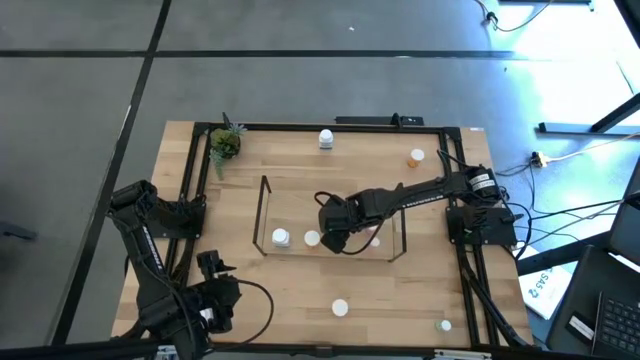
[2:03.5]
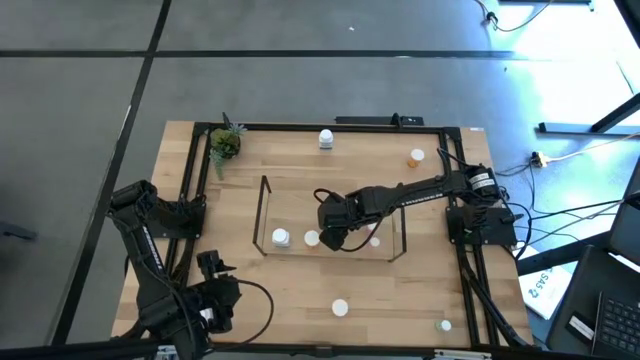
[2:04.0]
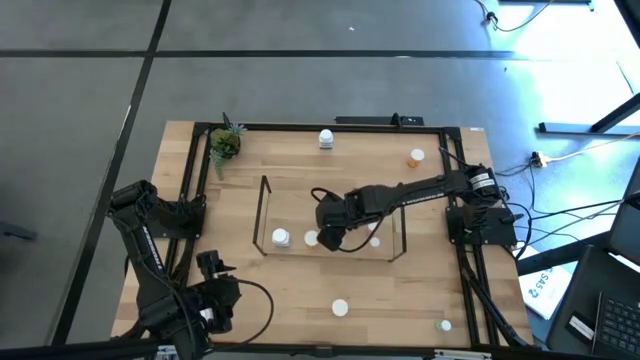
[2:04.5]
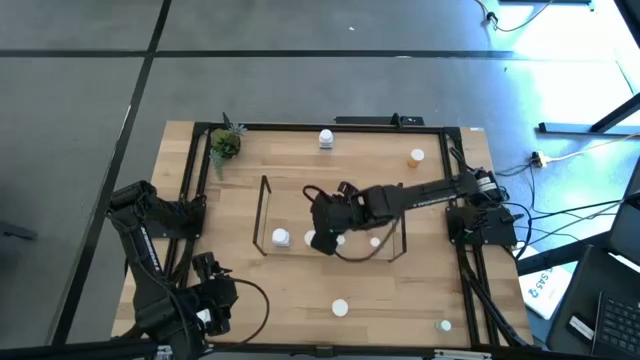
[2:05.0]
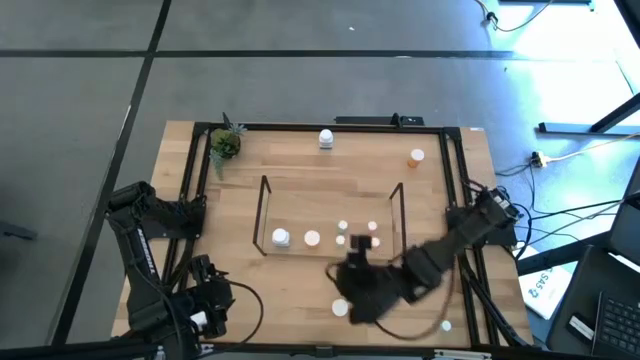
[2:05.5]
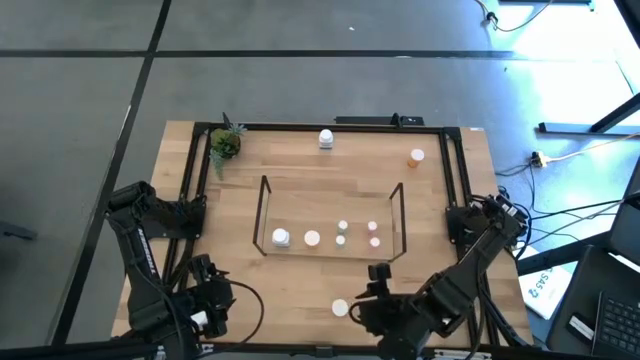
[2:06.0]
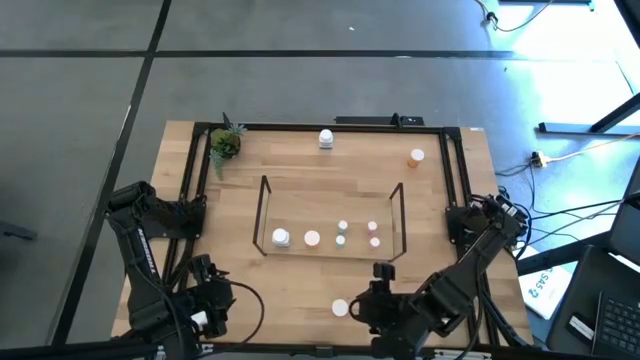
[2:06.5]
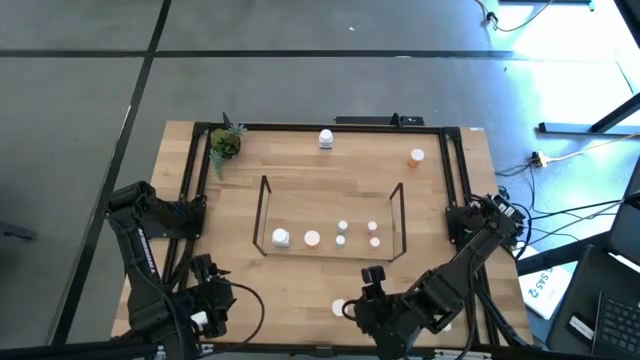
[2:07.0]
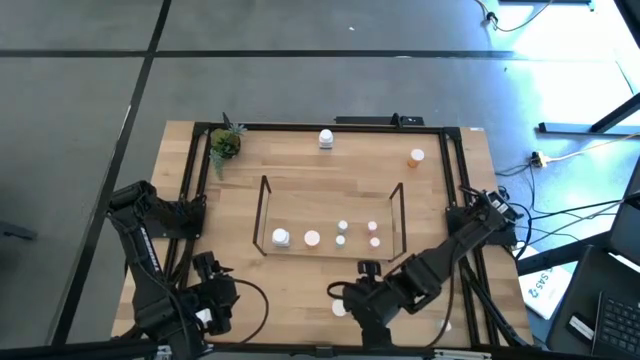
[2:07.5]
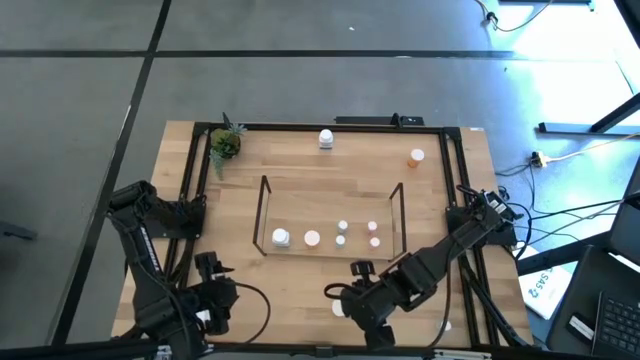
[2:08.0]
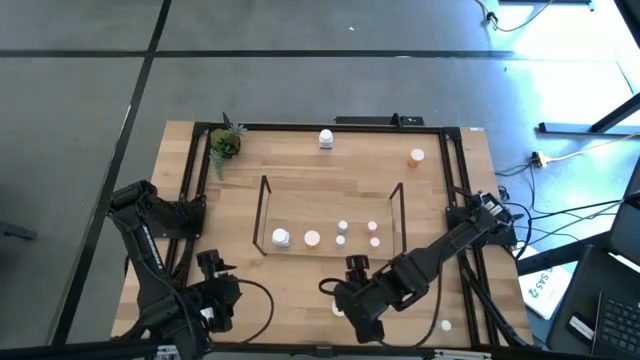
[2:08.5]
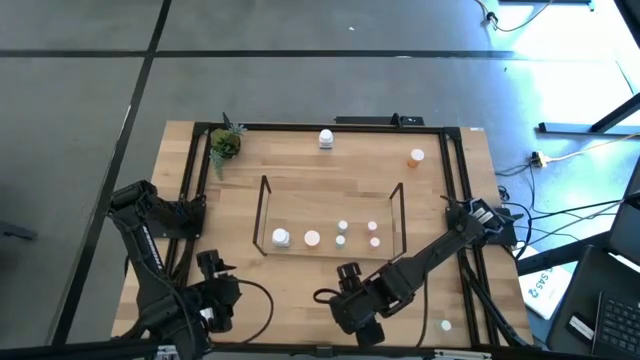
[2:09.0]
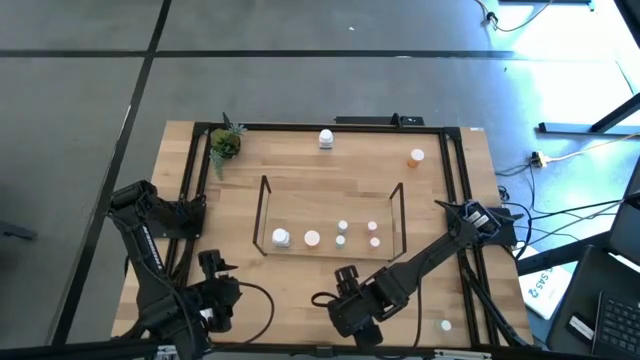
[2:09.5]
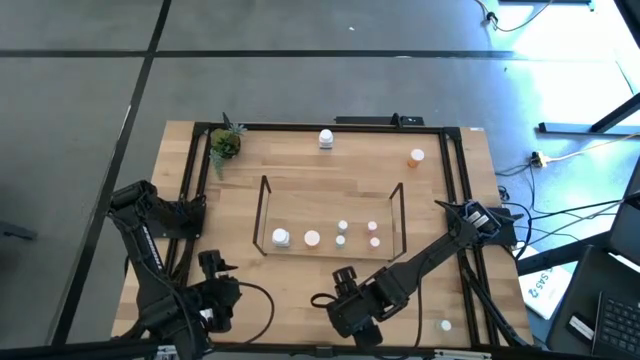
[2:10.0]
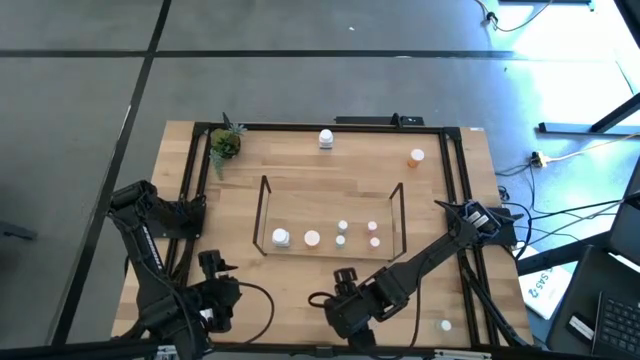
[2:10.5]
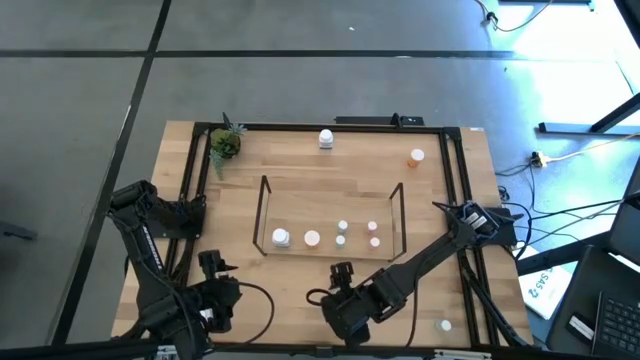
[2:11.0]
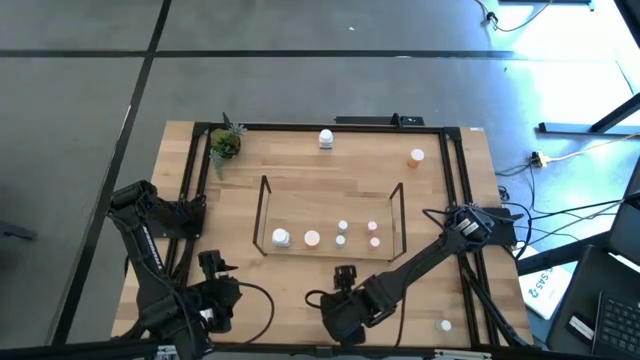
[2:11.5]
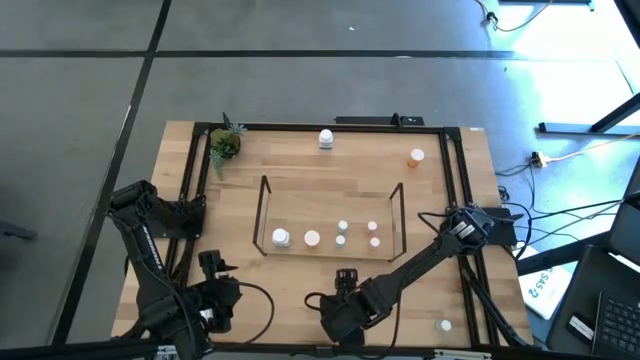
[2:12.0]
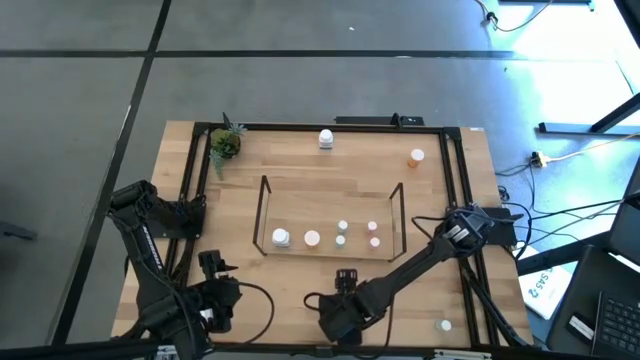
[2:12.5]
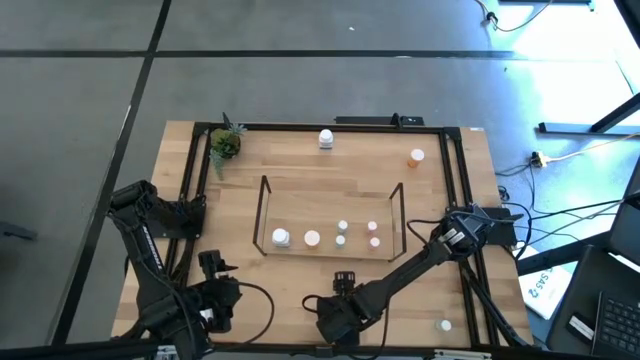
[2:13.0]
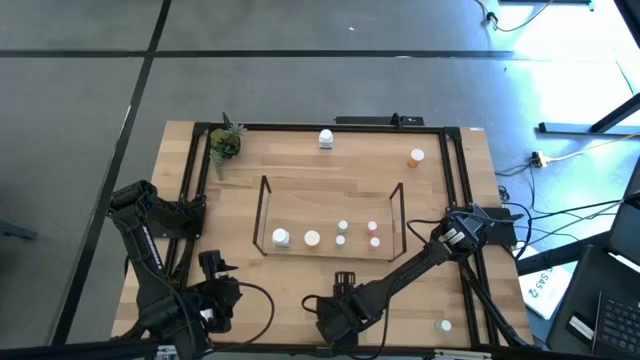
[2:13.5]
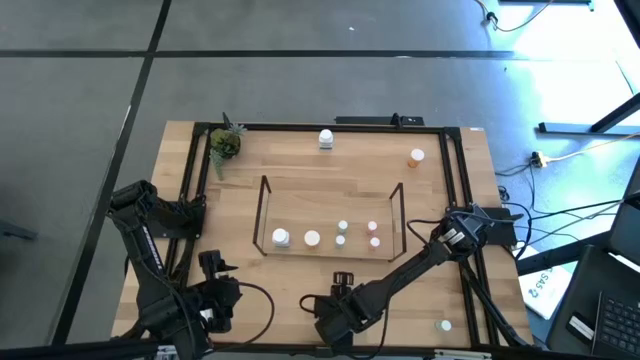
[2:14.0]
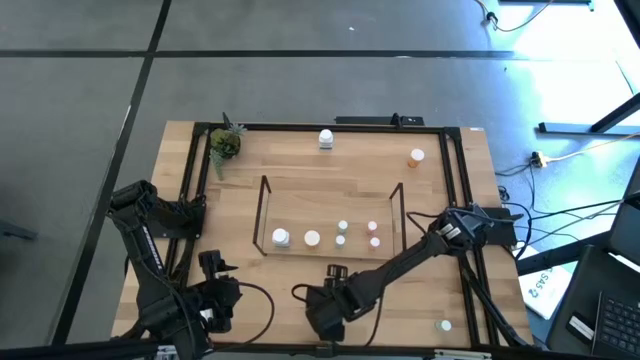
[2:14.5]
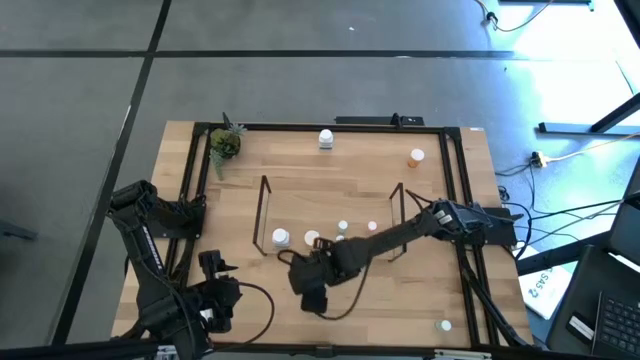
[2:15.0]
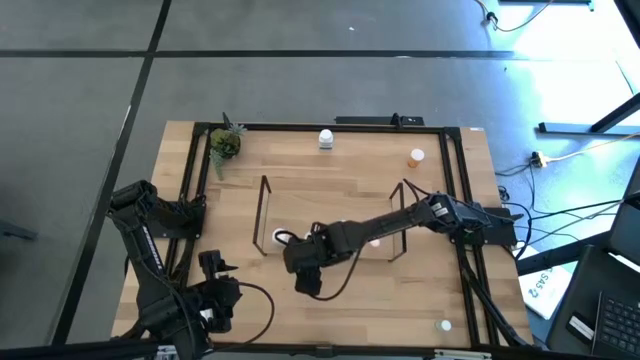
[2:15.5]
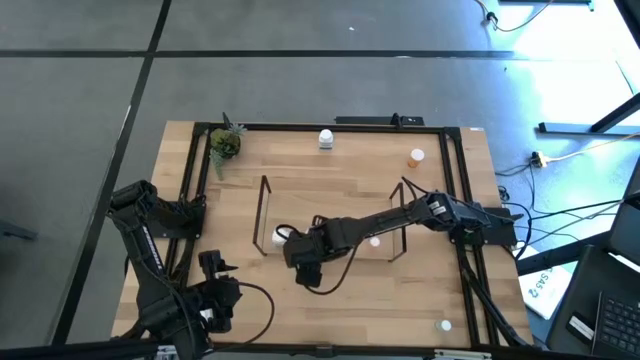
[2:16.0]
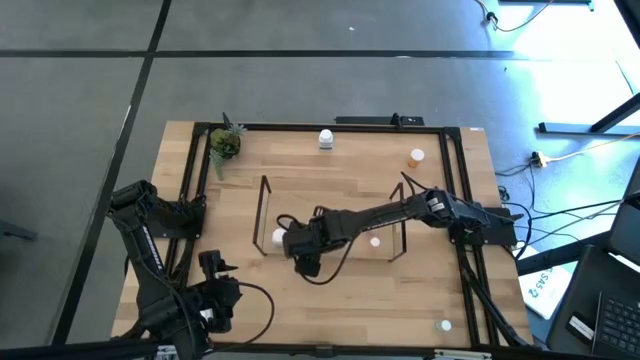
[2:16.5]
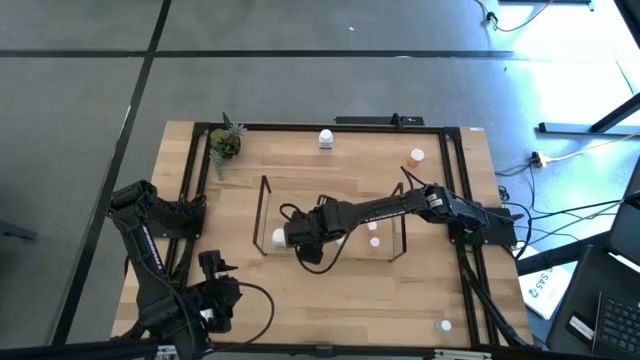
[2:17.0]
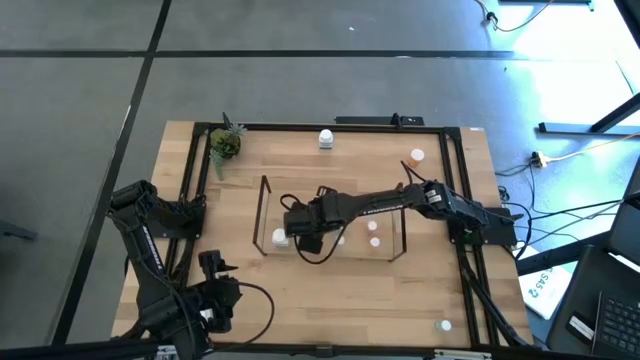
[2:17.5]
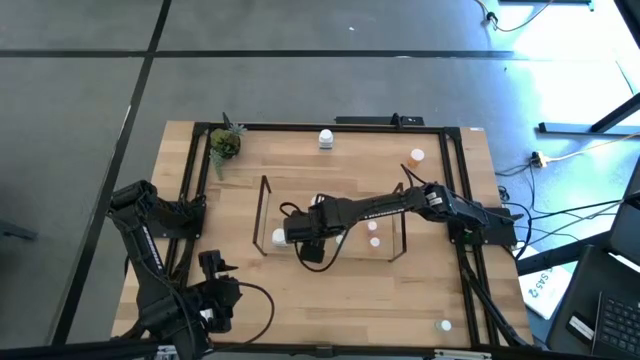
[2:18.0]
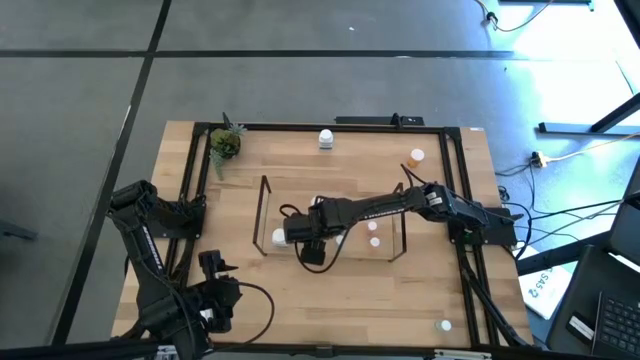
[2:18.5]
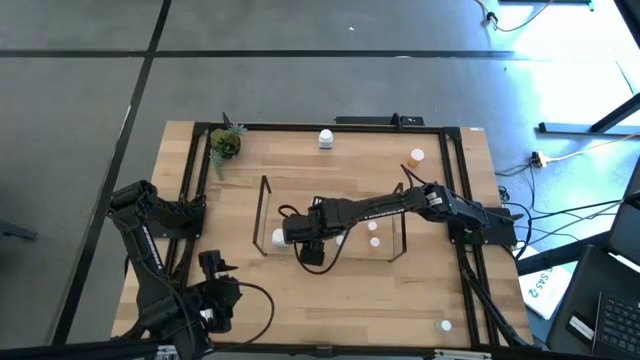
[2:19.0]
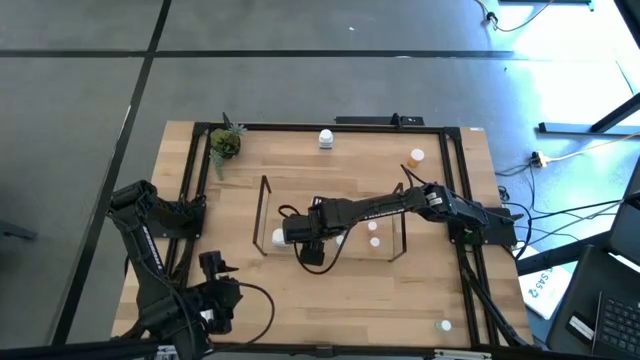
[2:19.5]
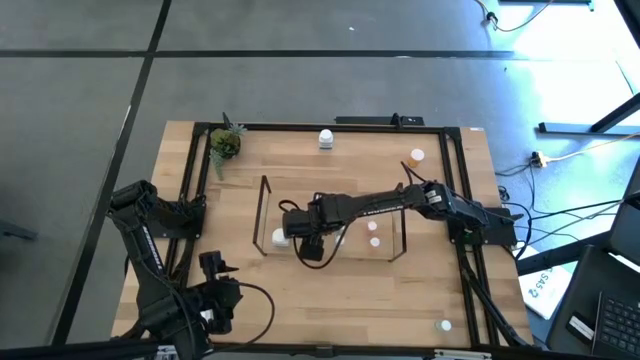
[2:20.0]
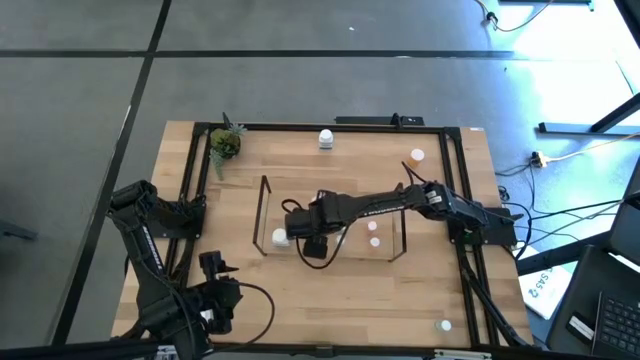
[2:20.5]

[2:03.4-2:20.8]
Task: Pick and place medicine bottles onto shelf by color
Put the bottom orange pill bottle on the shelf aligned with the other orange pill bottle

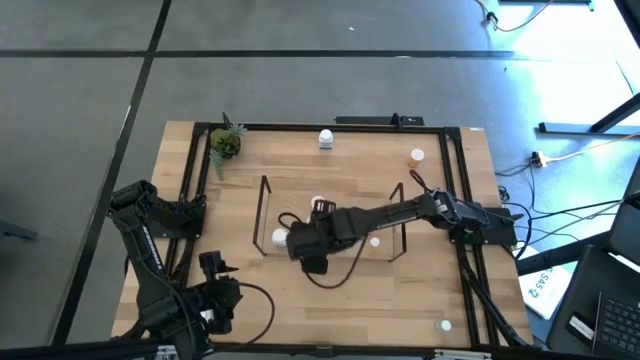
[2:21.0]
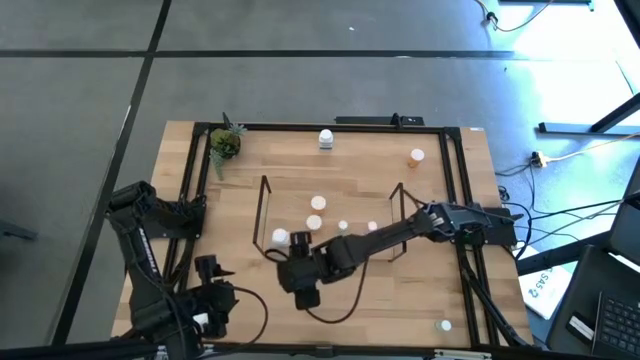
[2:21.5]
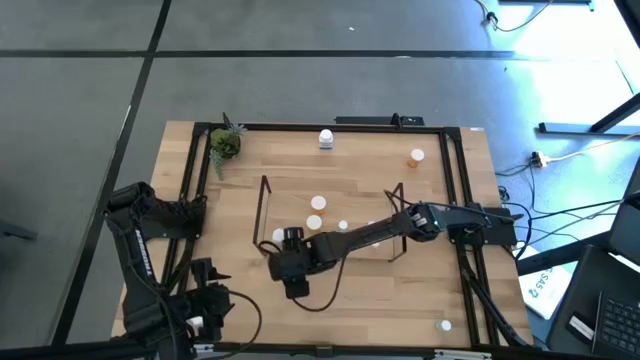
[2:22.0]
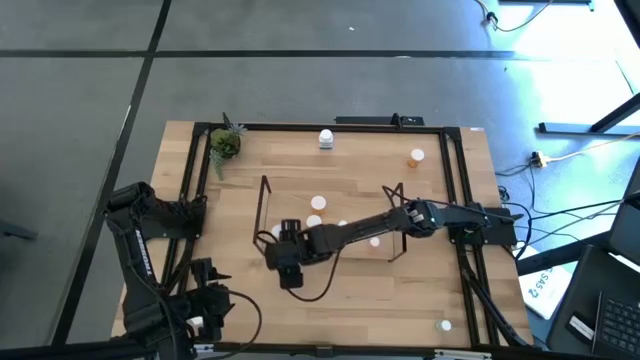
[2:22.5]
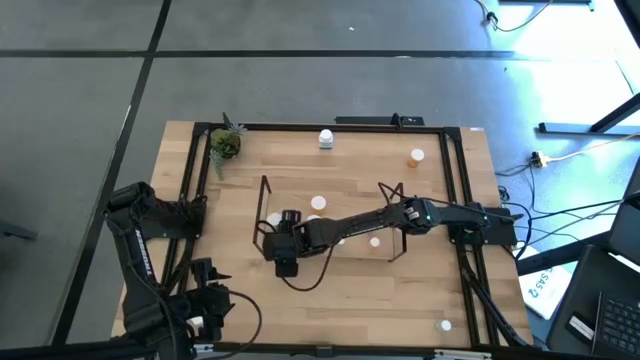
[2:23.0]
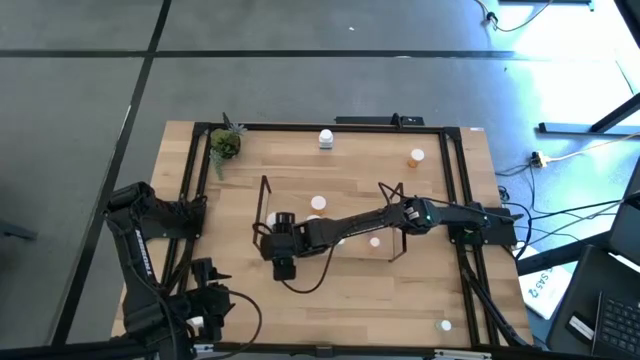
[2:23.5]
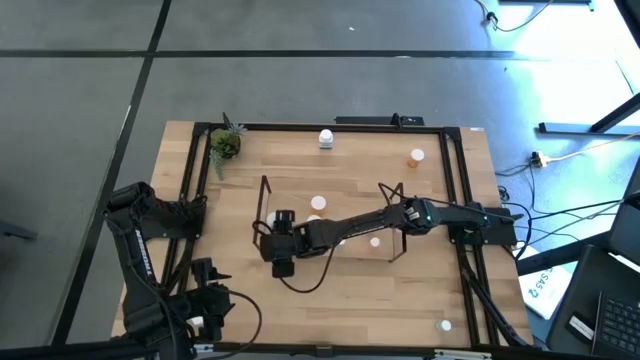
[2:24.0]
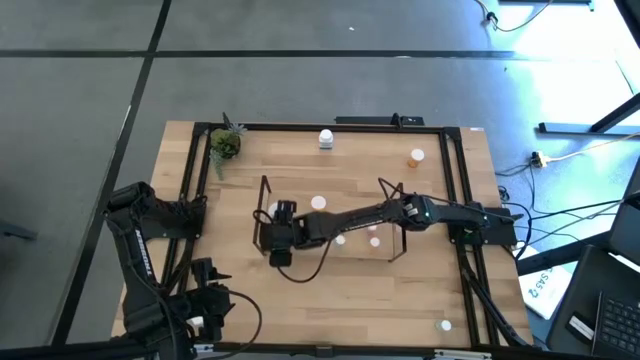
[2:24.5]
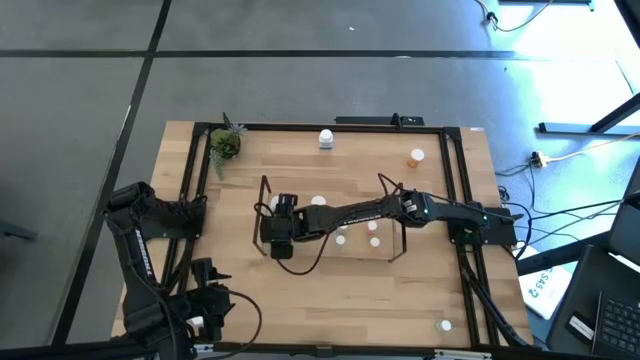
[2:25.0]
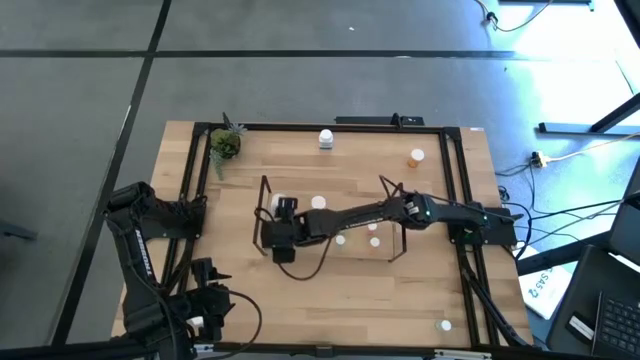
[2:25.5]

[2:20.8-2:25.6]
Adjust the white pill bottle on the shelf
